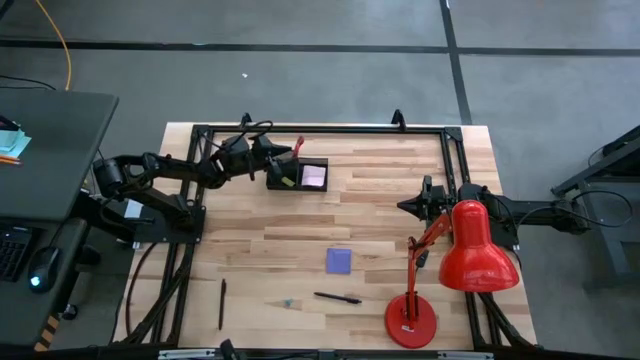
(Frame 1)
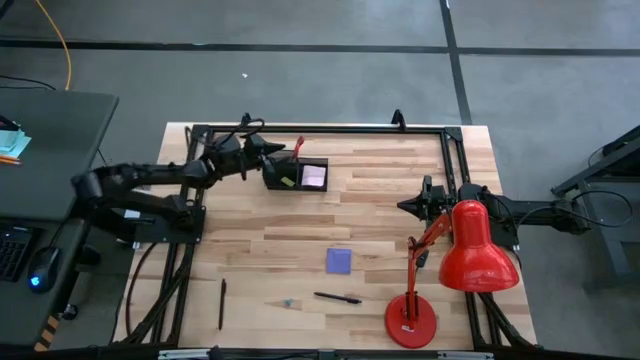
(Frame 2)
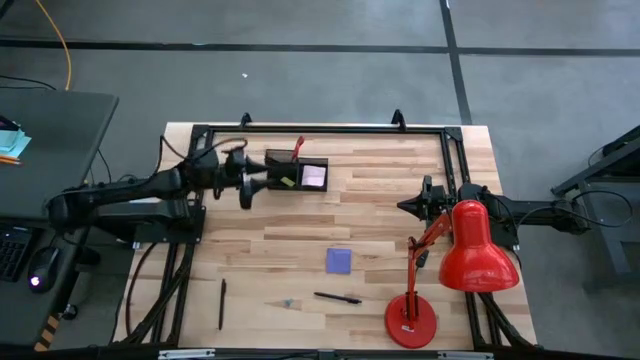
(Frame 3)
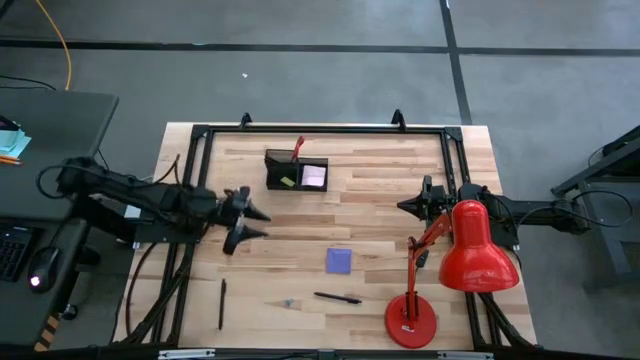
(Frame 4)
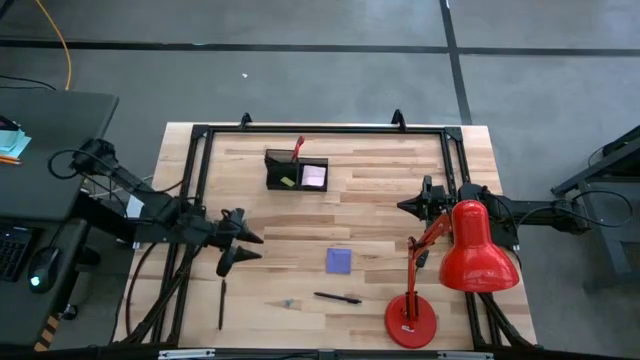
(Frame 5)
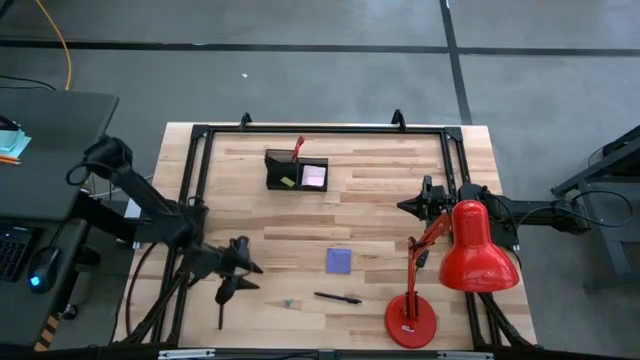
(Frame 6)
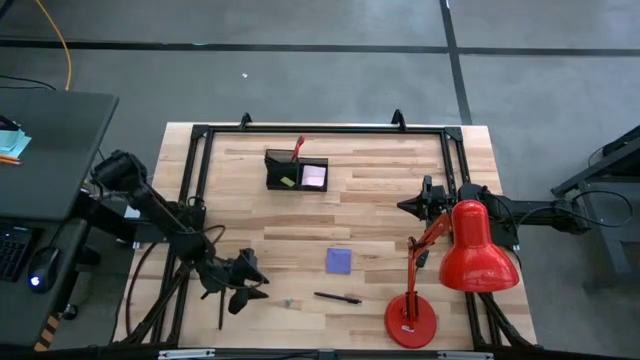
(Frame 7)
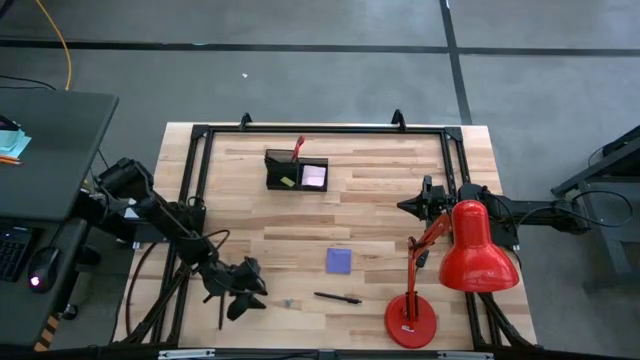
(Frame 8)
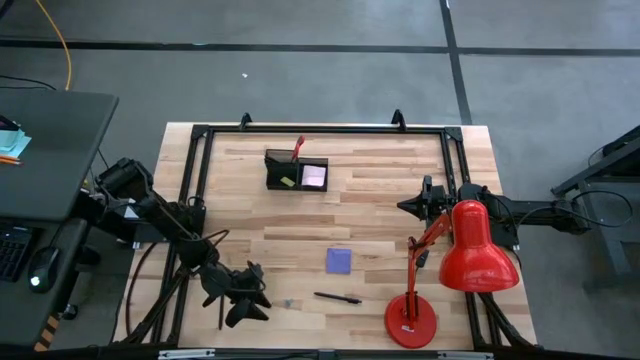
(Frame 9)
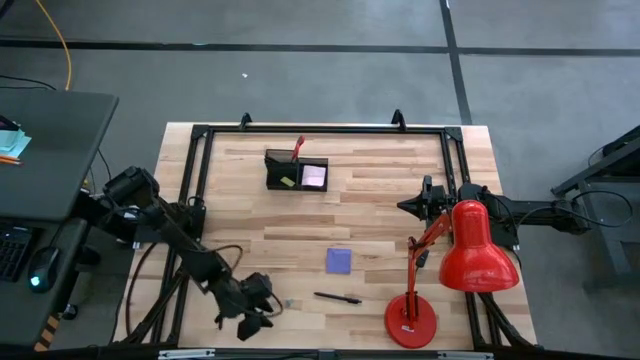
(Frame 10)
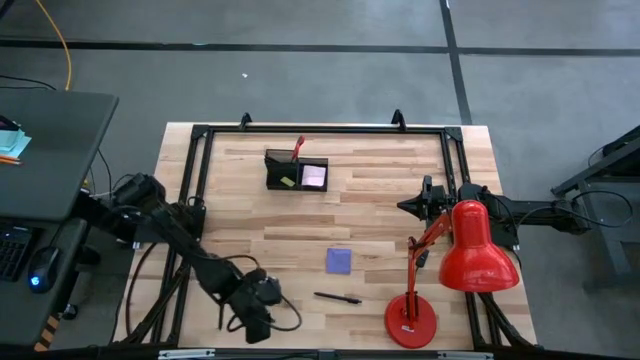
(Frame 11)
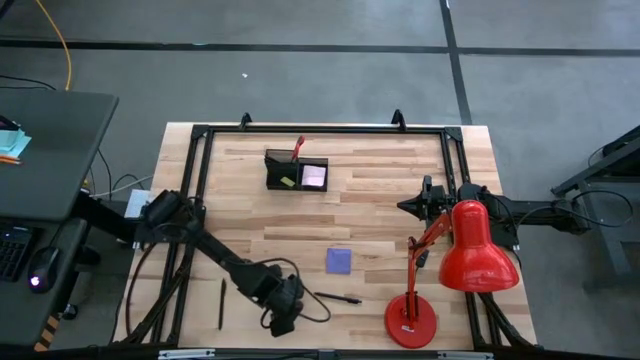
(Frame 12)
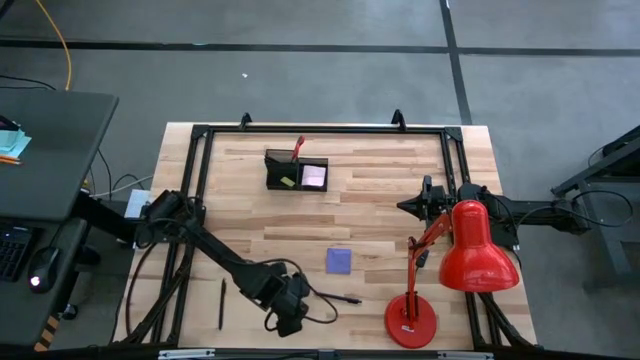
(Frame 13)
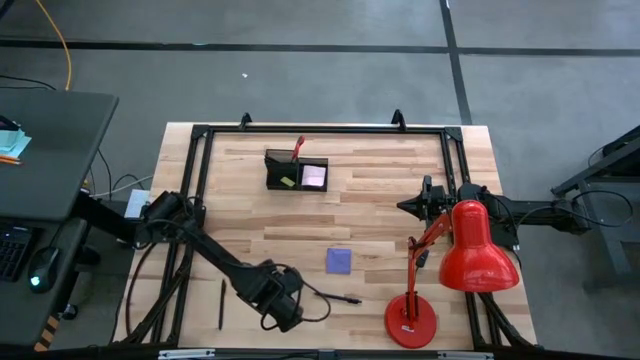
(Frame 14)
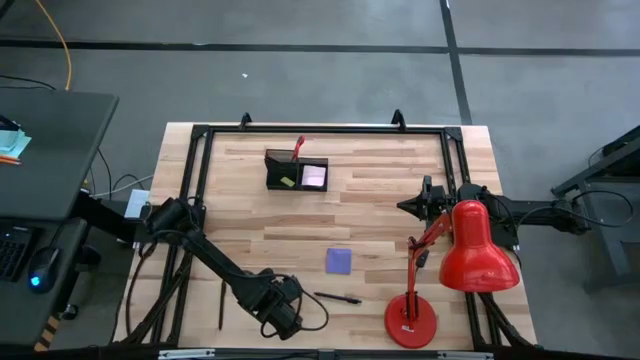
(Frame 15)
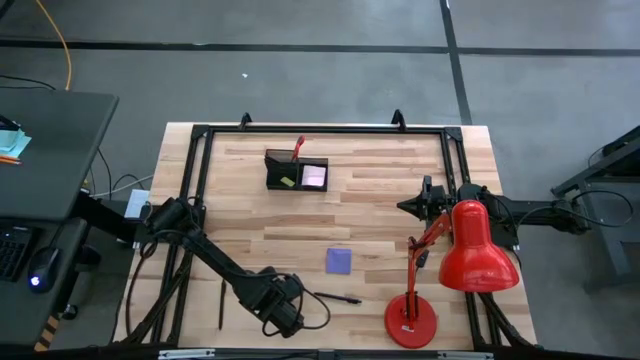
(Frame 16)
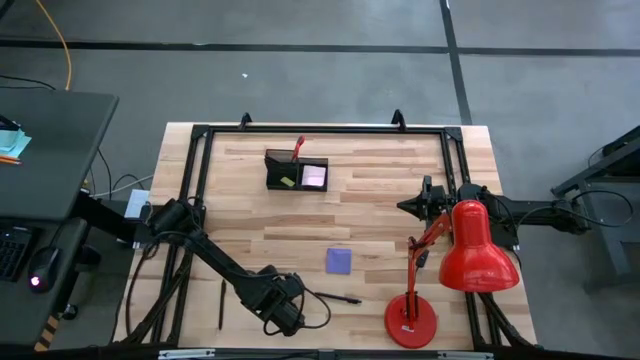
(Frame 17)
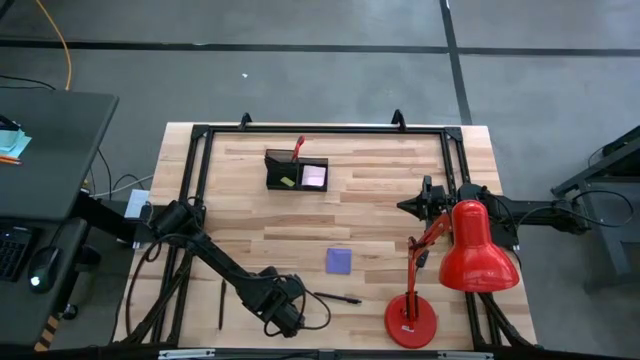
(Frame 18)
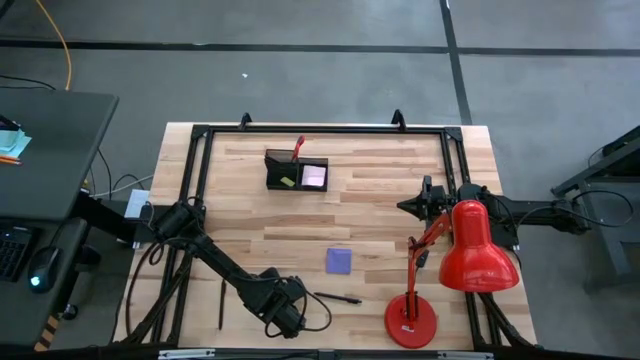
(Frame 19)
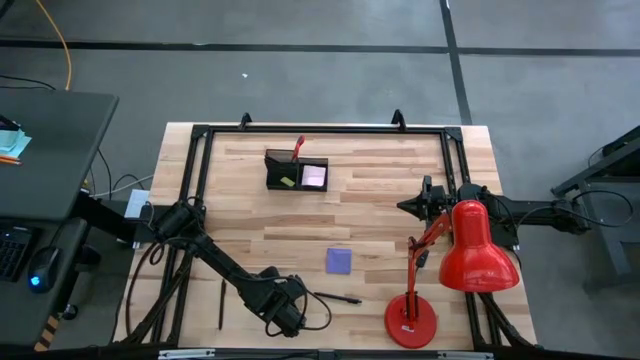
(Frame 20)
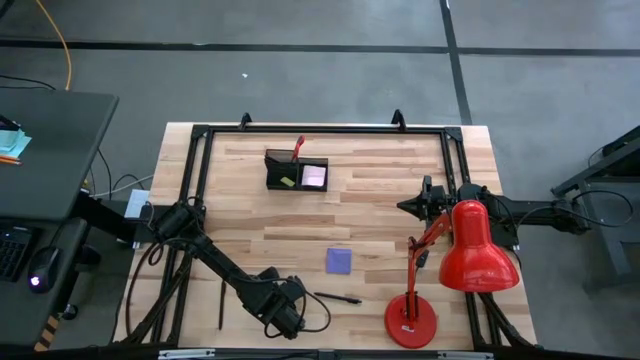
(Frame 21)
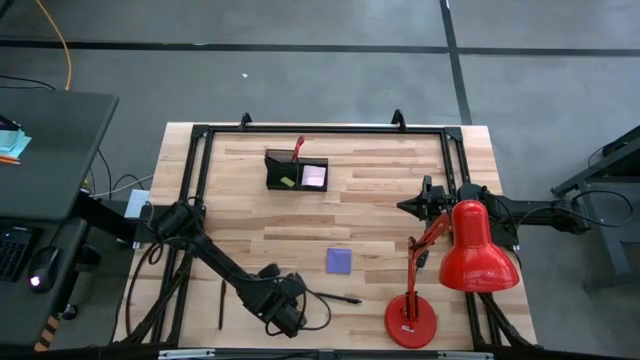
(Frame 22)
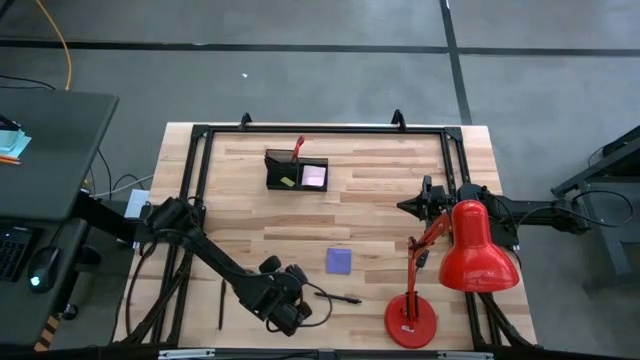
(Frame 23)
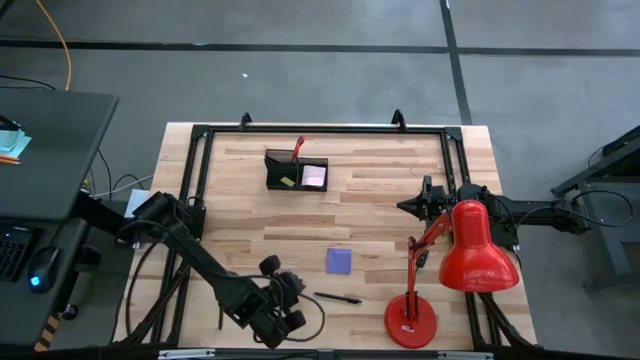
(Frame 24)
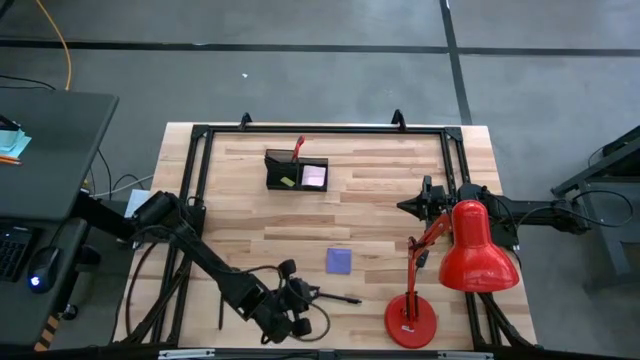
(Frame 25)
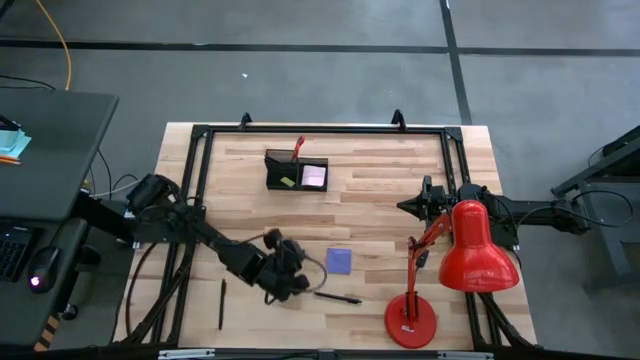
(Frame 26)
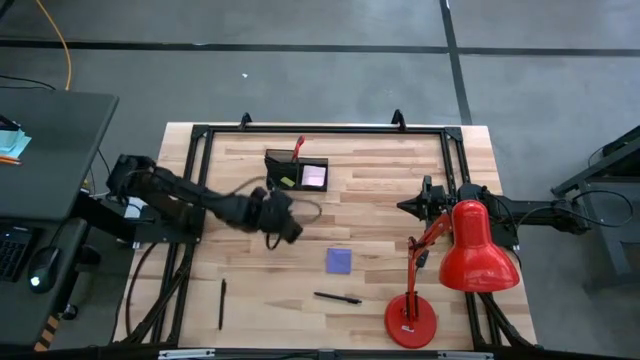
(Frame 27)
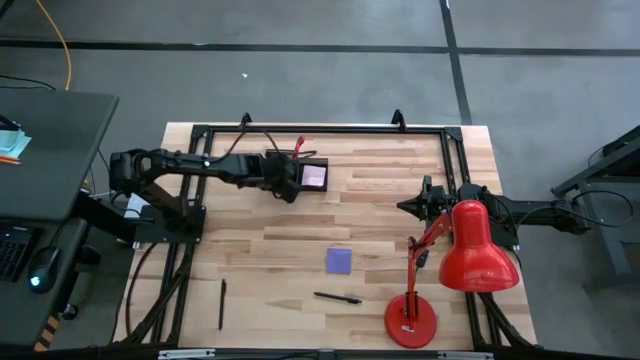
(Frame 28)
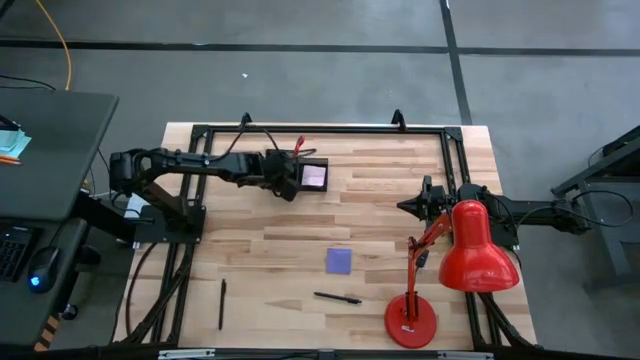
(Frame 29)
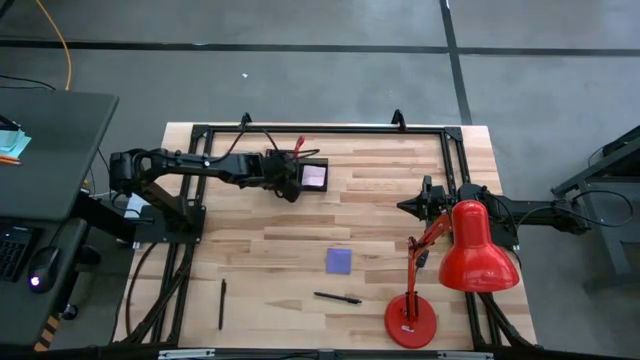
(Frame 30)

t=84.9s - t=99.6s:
Task: Pick and place office supplies into organizer
Put the blue binder clip into the black desk organizer

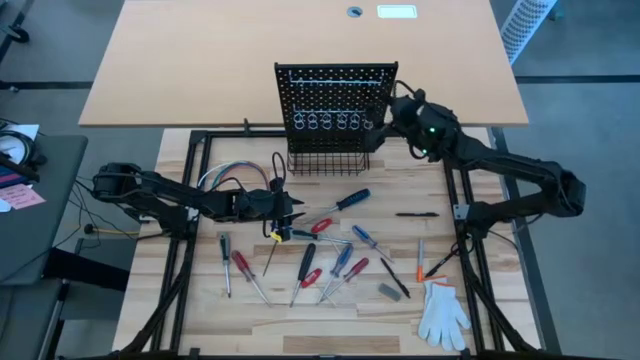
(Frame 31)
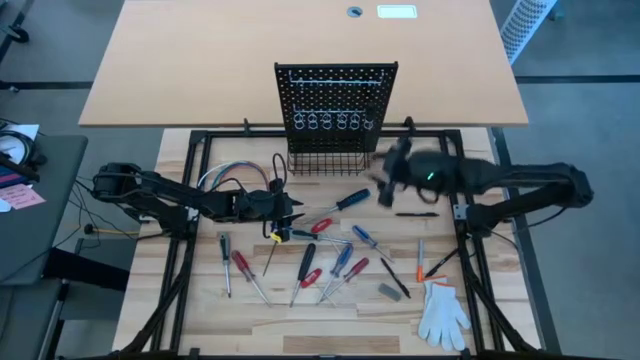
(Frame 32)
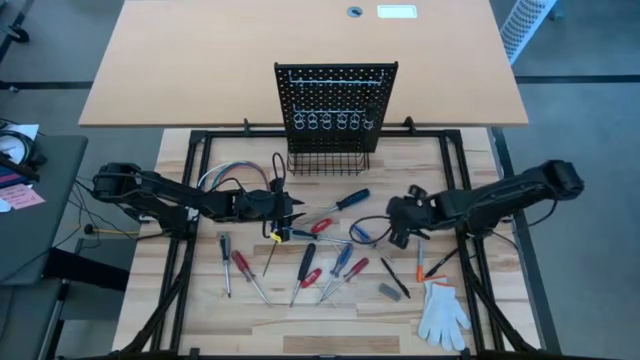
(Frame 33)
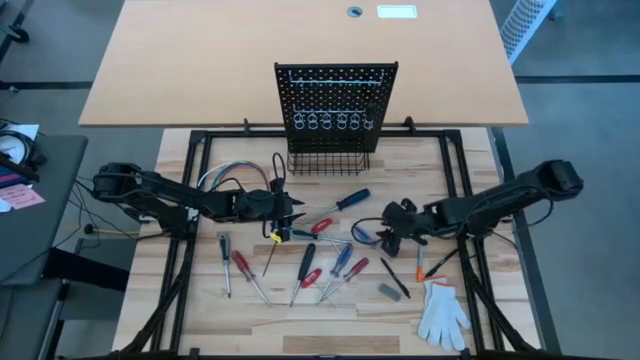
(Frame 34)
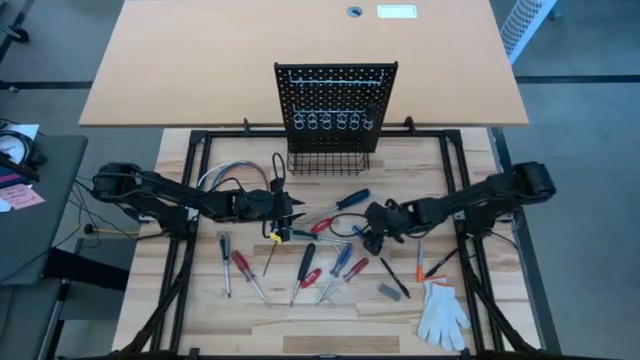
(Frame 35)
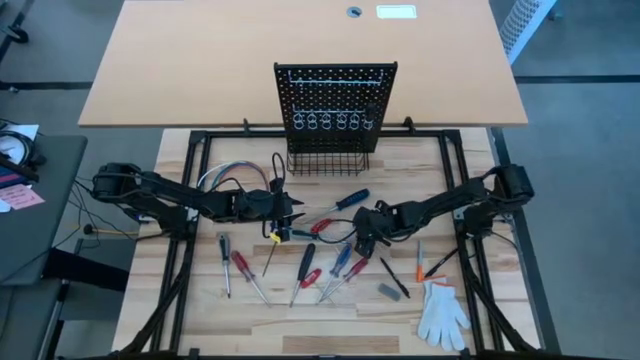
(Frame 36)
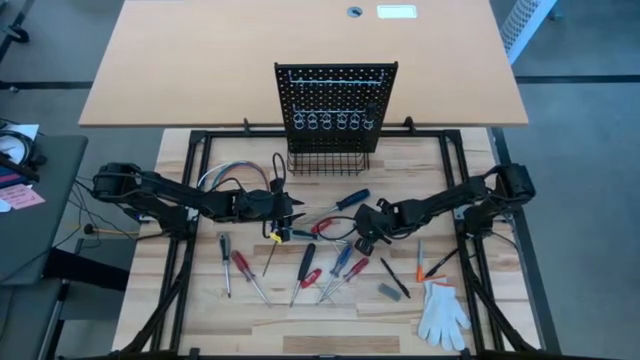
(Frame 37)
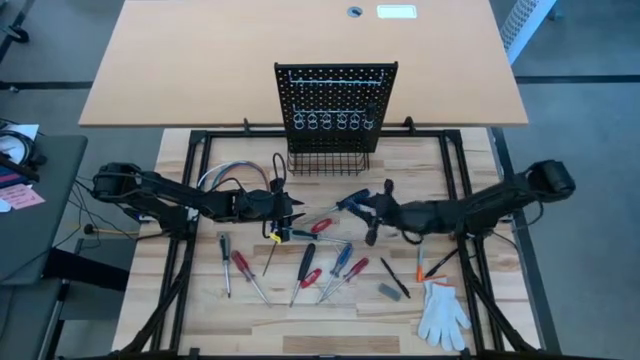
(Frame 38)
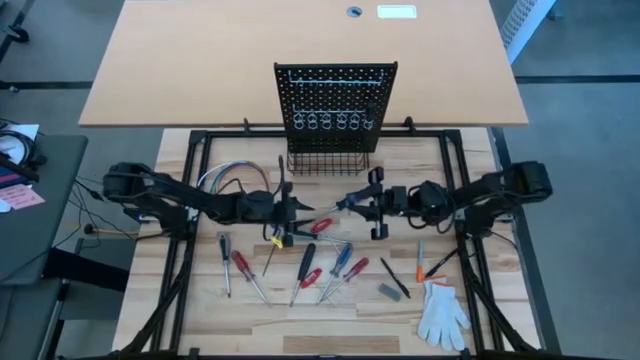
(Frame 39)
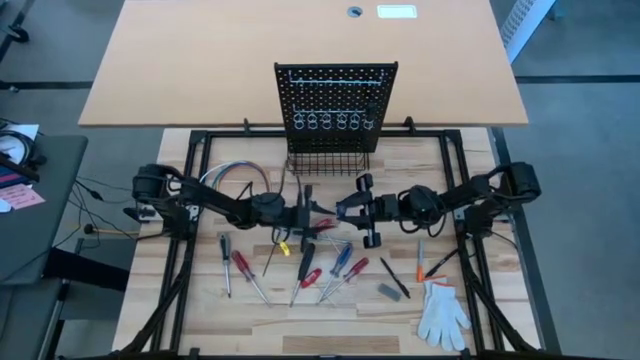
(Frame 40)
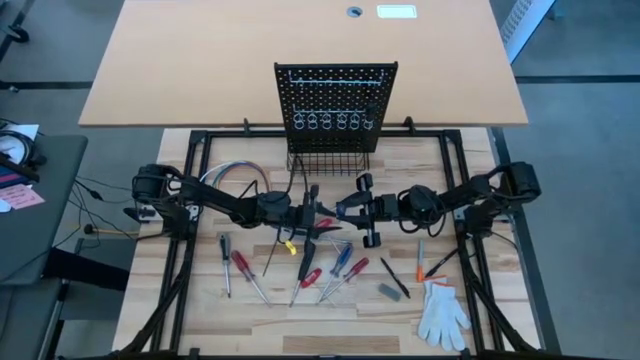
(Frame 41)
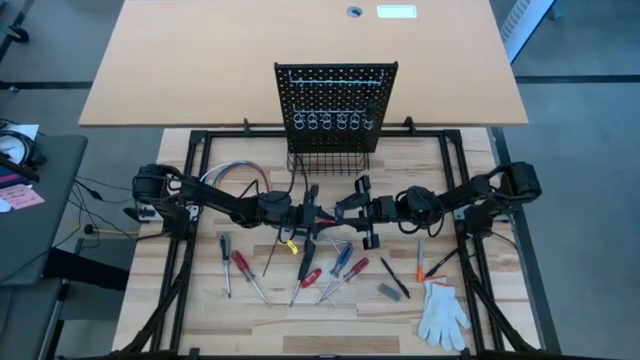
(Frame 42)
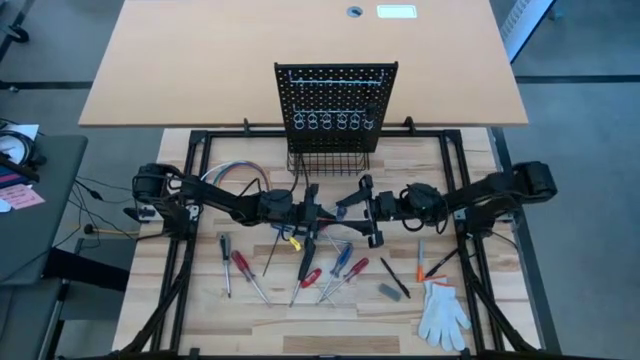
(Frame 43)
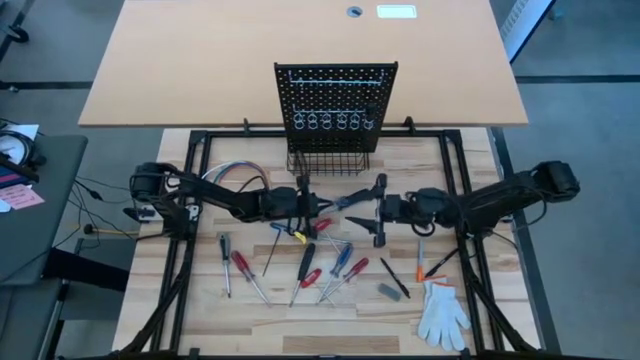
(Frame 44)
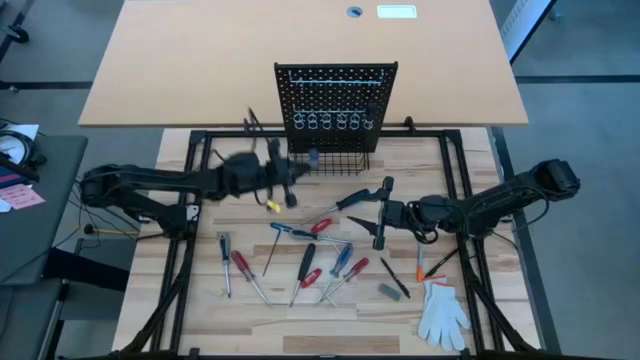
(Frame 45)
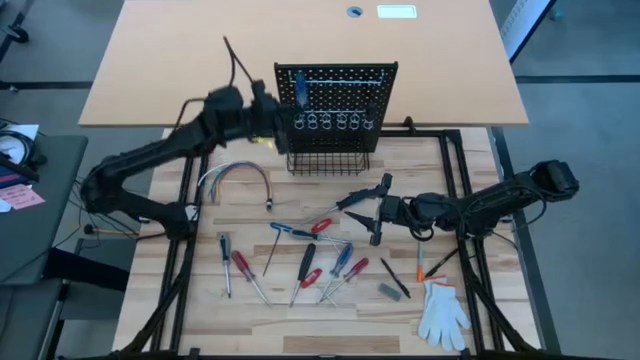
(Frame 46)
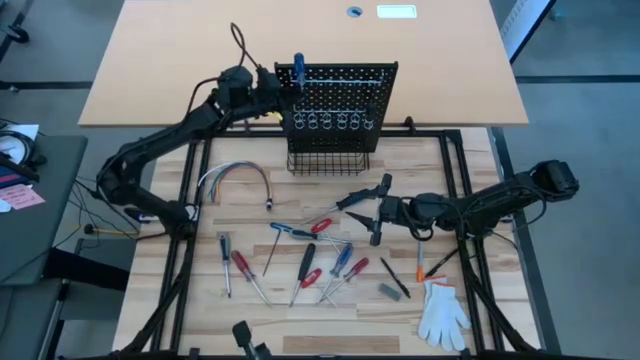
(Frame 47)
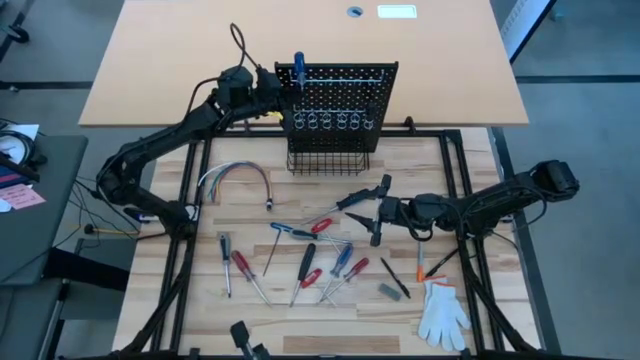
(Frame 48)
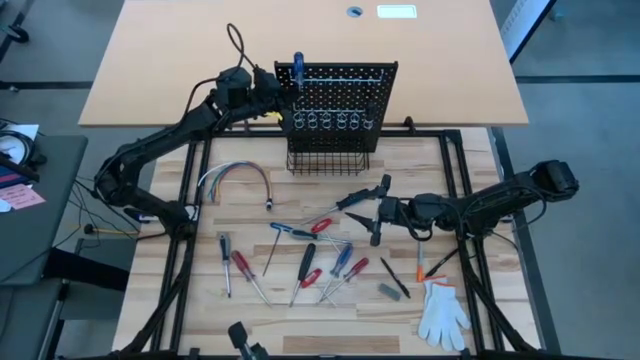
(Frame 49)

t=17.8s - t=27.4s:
Task: Hang tools onto peg board
Hang the top blue transparent screwdriver on the black peg board
